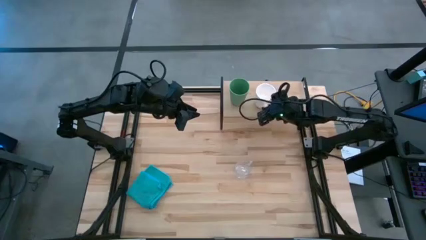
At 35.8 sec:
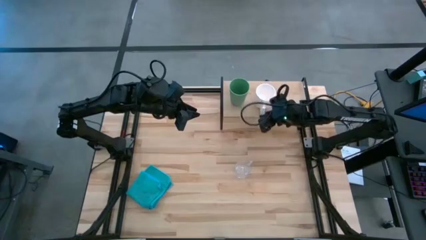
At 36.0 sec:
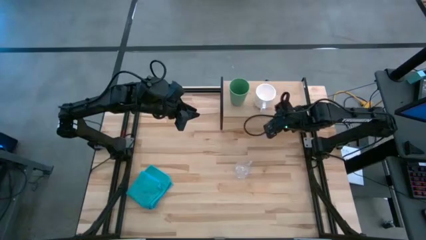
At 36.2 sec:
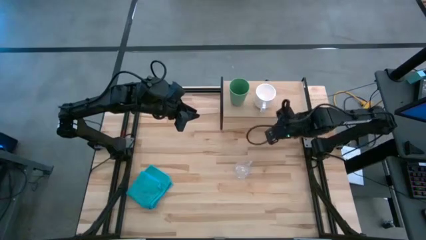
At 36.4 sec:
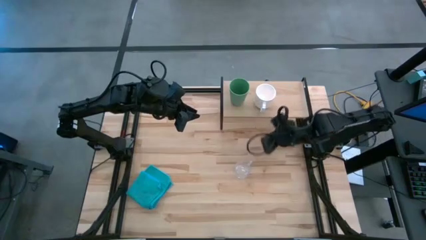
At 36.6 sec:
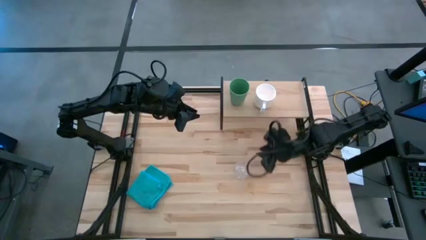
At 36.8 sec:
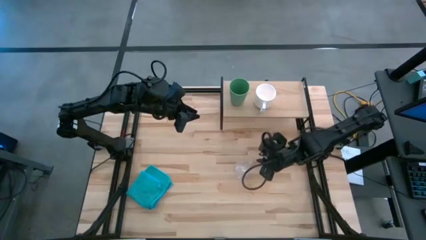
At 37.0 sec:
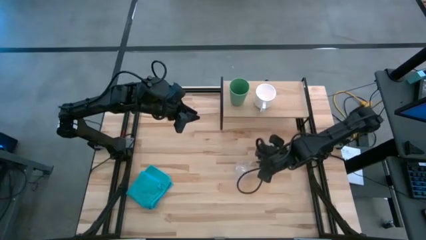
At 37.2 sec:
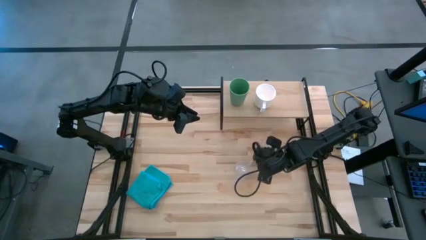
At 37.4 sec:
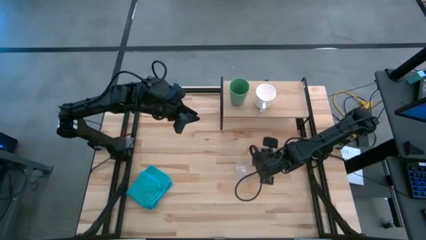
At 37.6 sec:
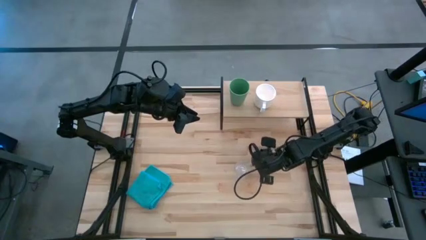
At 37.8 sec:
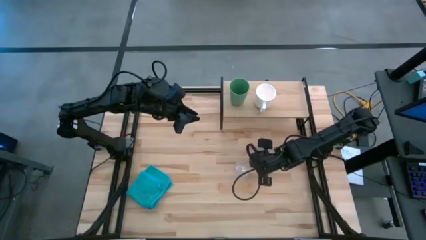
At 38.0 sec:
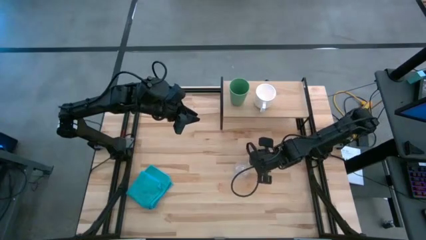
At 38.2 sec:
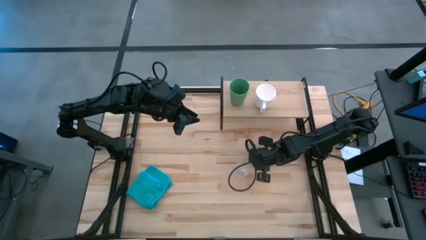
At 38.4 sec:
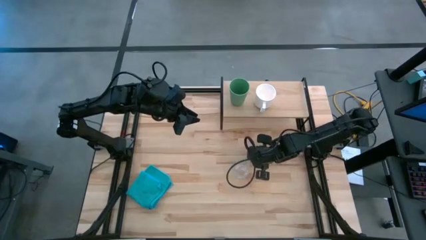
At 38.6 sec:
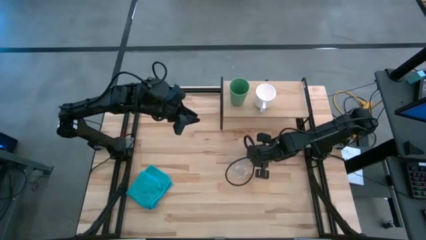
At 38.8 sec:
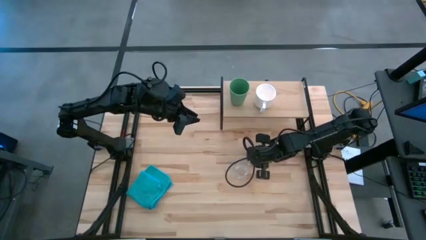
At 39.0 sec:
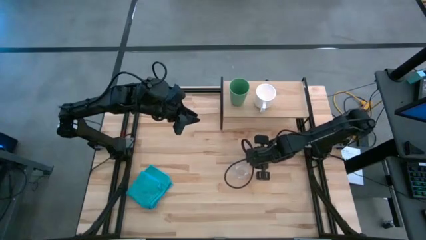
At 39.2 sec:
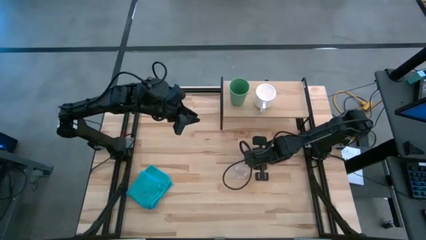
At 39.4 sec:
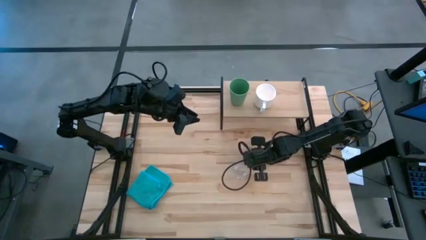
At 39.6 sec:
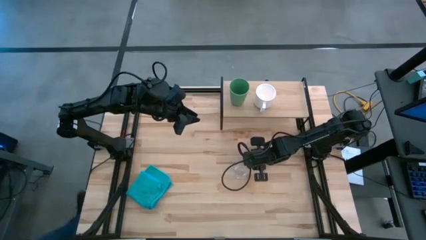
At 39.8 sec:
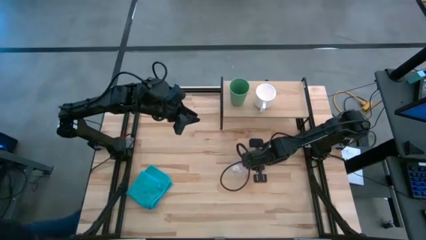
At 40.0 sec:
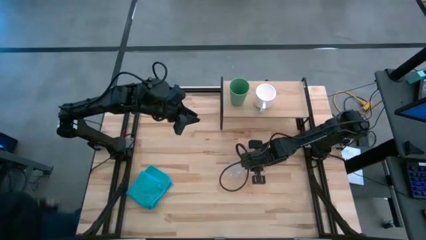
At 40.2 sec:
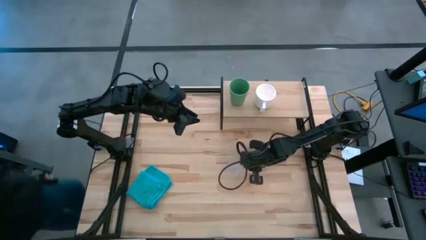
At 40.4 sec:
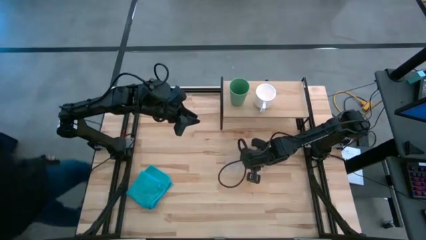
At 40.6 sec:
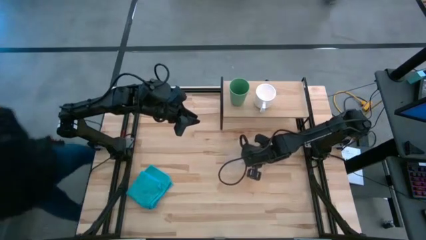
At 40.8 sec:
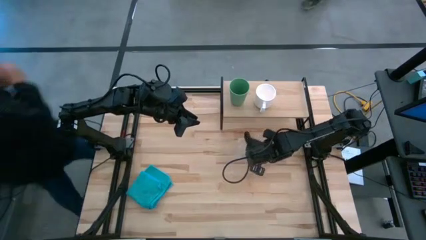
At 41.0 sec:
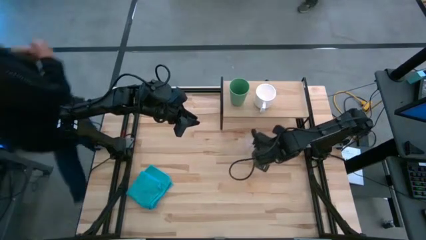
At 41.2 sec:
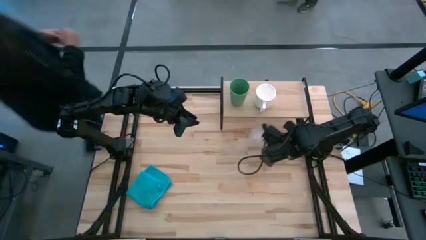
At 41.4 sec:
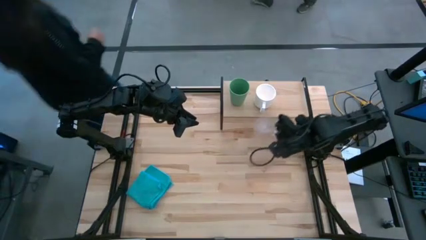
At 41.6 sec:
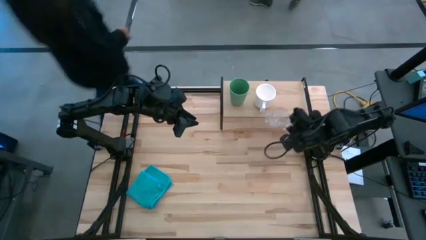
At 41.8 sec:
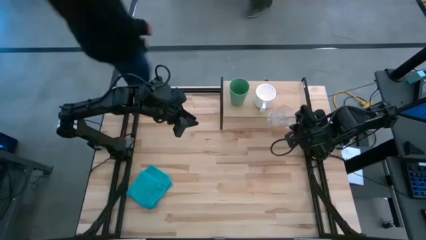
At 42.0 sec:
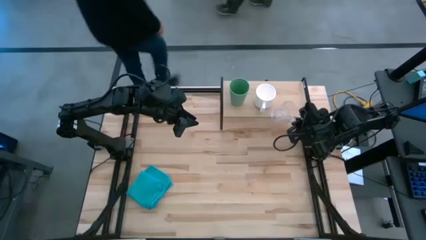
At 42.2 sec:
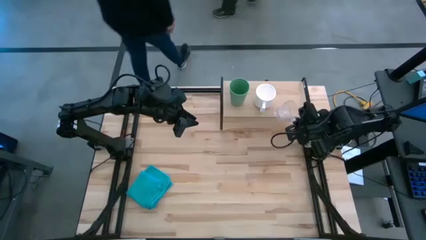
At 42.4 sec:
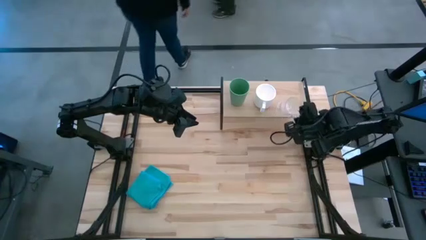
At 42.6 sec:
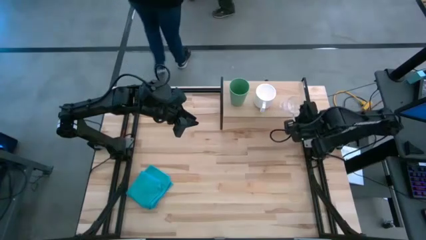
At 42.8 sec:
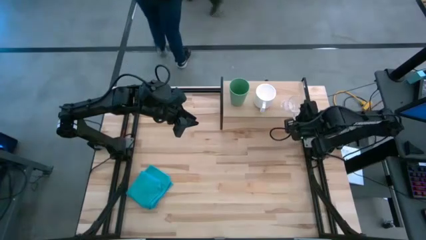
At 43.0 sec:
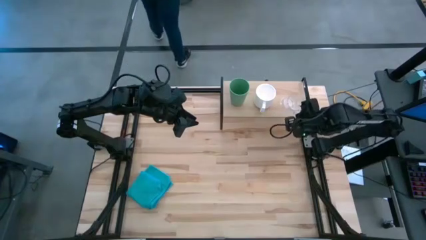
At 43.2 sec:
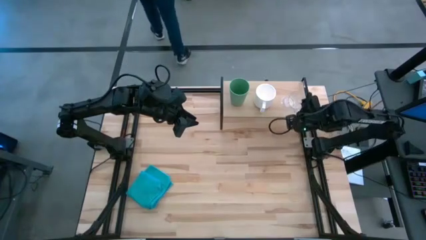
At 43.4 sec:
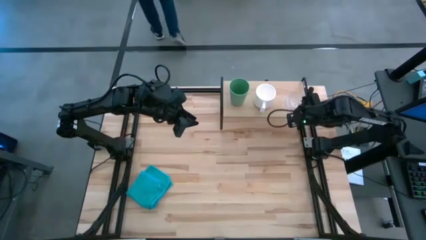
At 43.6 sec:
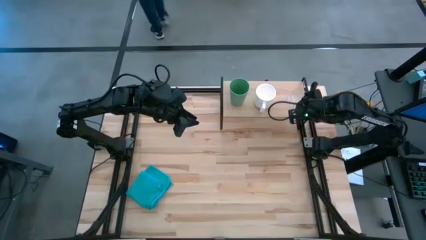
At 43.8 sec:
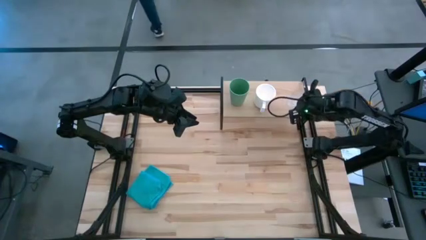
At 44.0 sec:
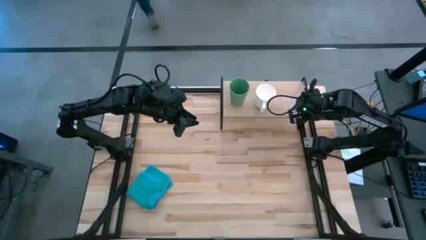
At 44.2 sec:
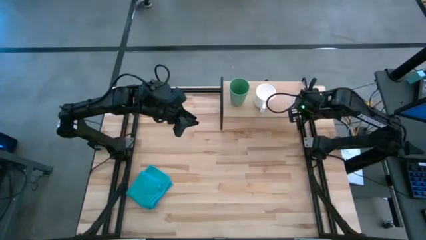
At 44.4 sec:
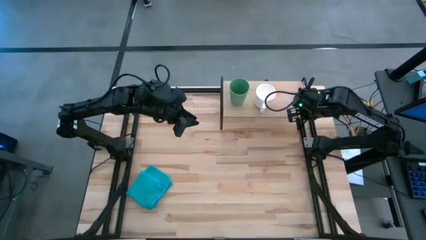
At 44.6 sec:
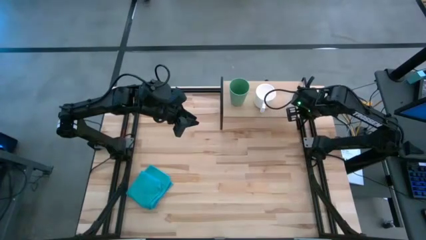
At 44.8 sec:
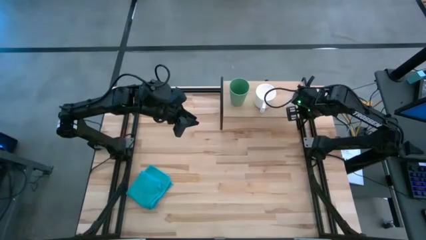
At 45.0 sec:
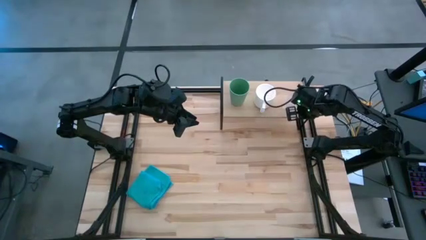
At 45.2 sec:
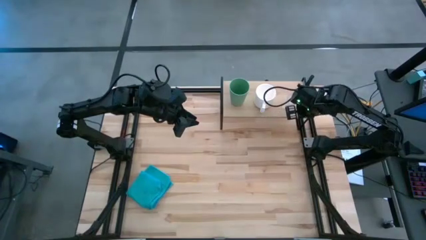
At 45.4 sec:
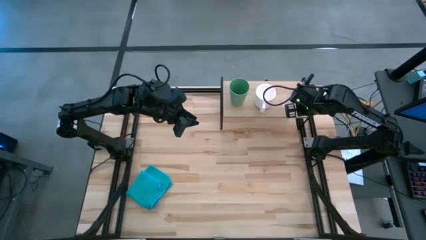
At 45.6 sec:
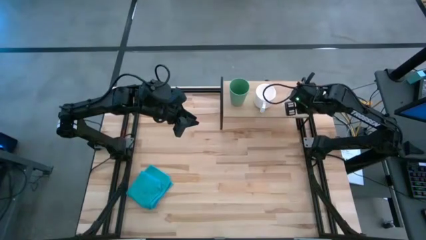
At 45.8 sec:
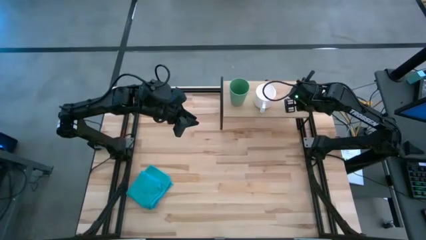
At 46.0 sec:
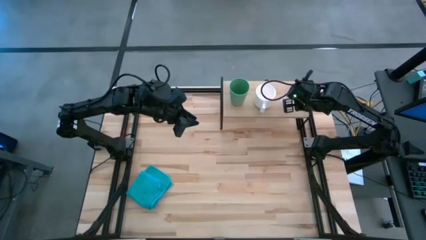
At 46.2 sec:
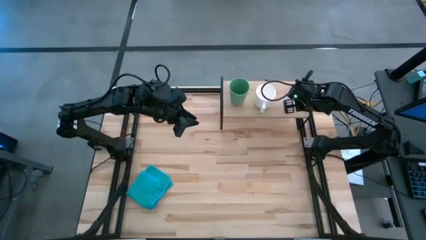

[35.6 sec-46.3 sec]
Task: Stack small to large cups/mugs on shelf
Put the transparent mug on the shelf

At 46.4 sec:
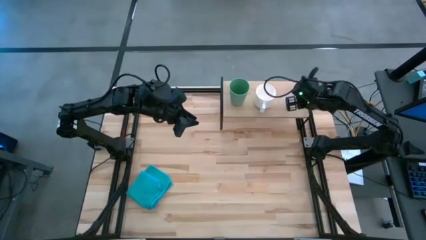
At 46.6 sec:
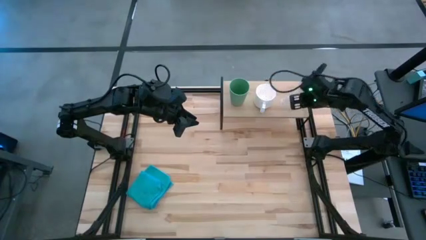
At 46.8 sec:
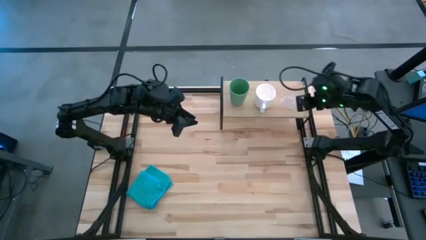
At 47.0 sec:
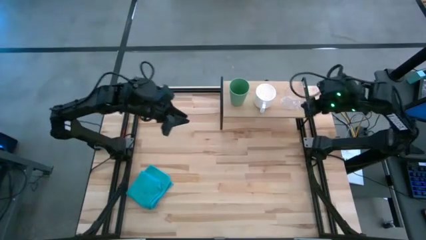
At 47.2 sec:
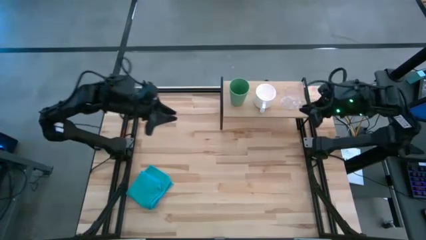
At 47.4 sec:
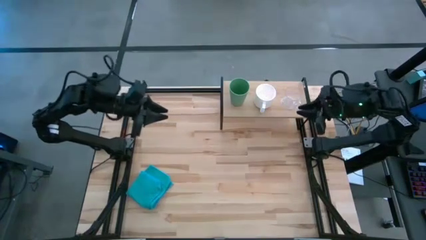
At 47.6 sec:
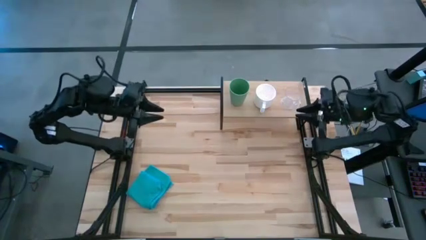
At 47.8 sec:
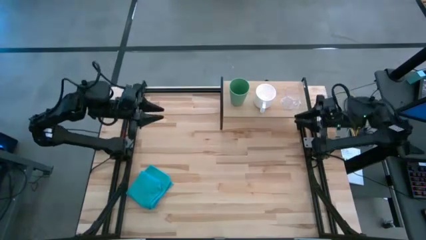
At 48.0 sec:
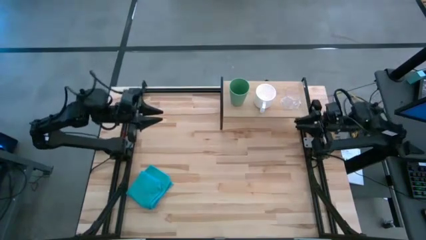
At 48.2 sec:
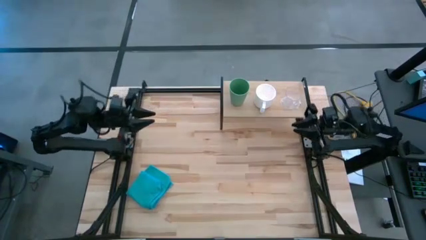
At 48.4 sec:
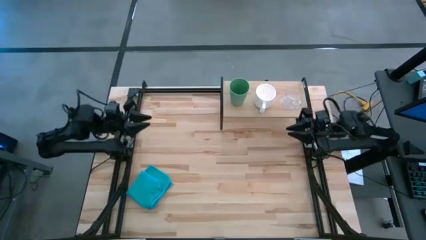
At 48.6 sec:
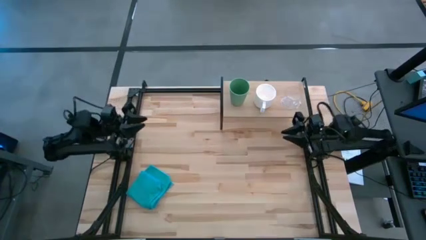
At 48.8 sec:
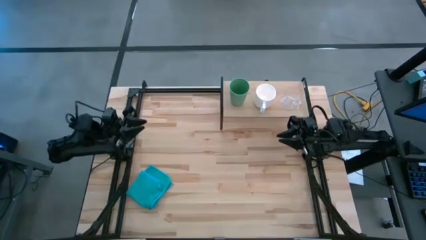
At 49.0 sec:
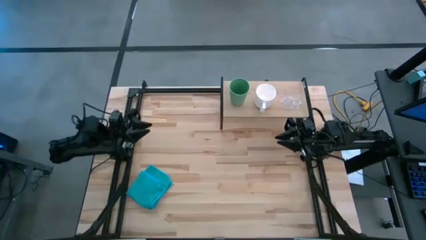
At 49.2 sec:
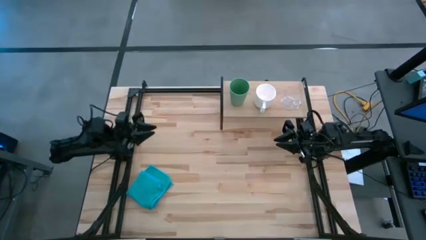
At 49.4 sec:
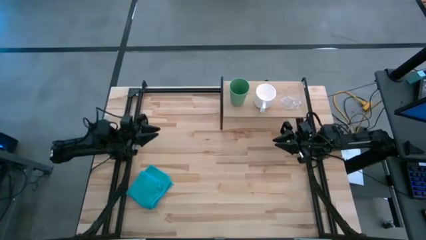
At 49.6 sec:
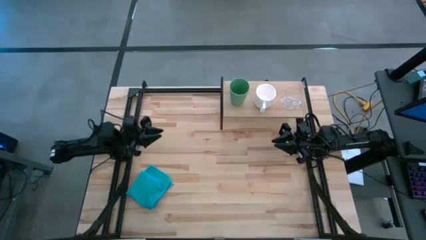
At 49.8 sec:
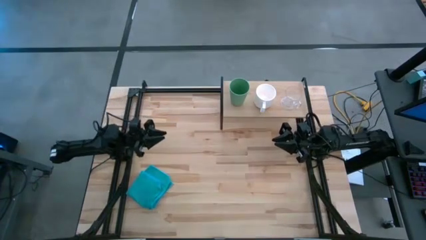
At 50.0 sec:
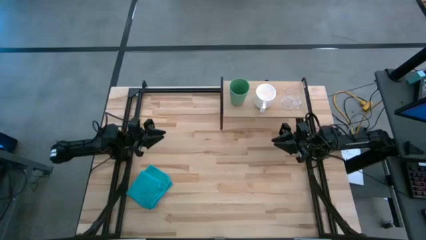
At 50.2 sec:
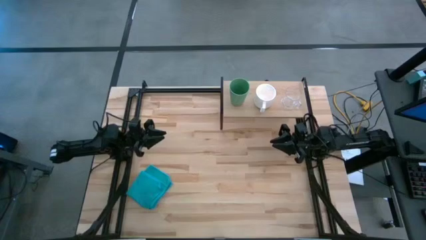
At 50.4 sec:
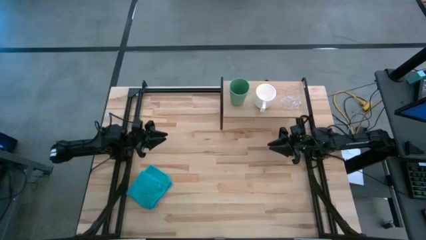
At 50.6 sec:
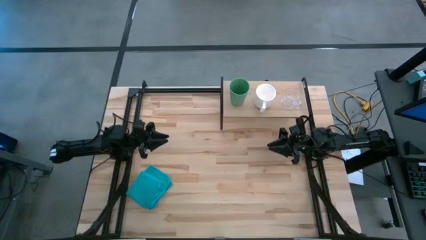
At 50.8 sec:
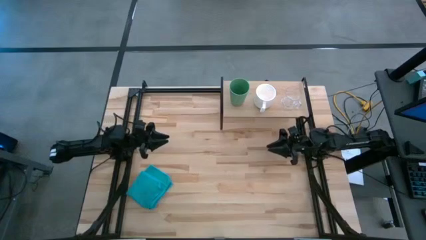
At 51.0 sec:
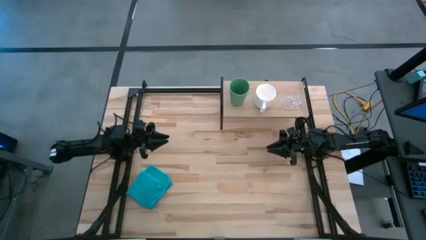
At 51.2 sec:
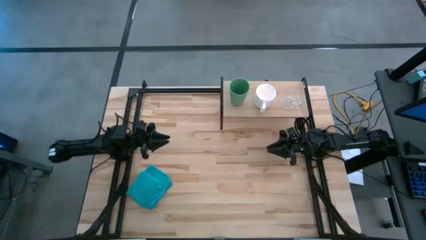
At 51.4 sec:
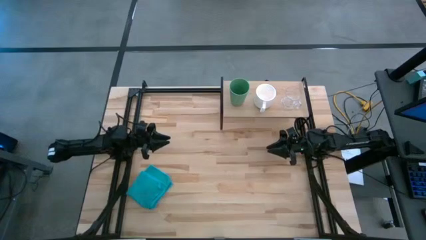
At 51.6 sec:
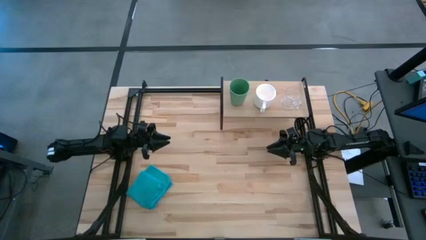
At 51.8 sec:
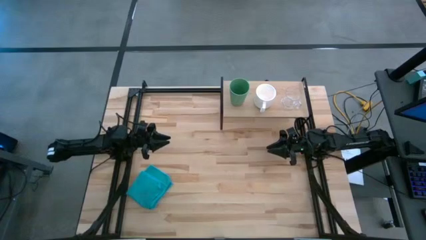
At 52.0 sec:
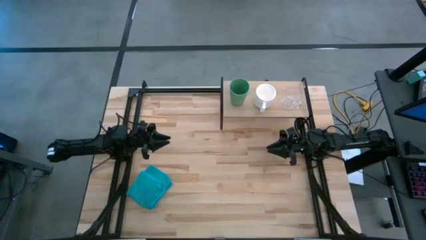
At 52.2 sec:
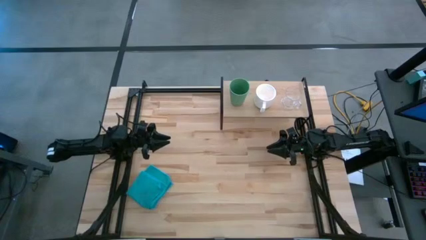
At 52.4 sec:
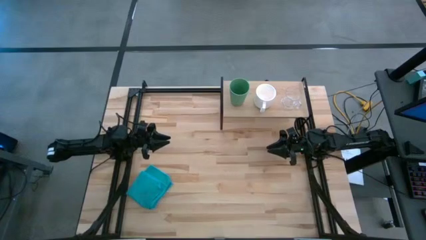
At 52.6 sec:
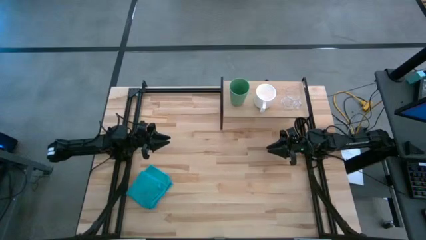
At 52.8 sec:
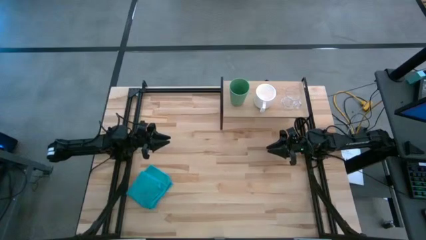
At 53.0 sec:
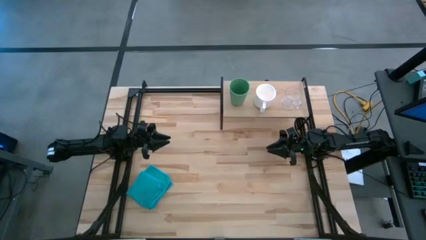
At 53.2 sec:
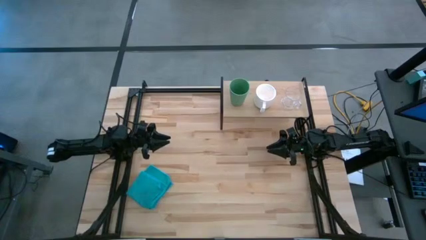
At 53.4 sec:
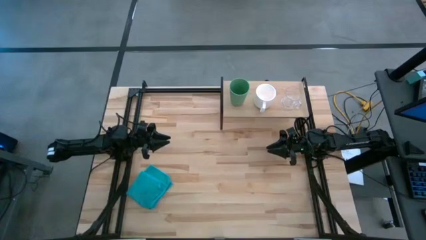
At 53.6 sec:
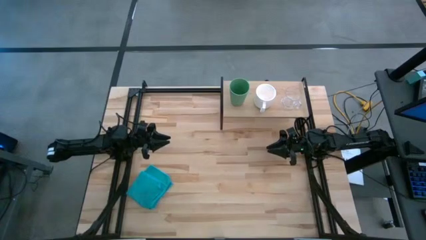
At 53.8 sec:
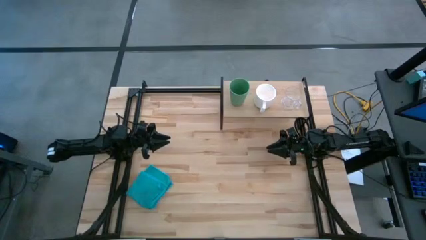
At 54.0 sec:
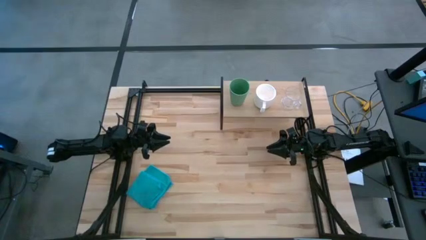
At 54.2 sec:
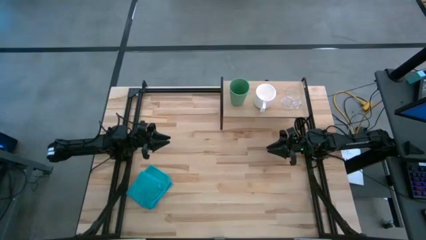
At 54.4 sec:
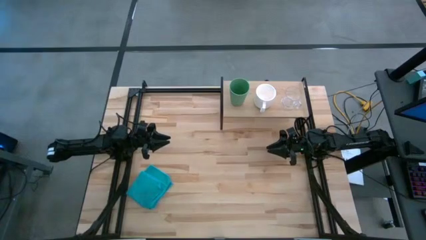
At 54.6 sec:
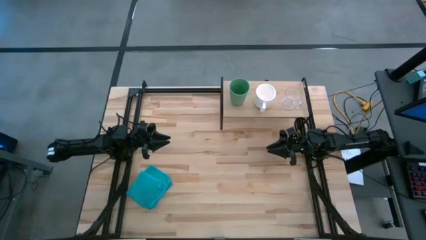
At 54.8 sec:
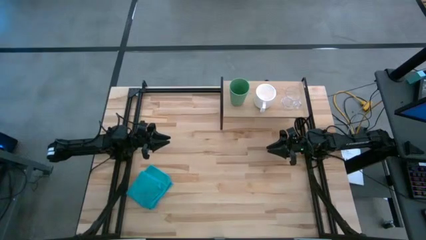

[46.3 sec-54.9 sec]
Return to Home Position
